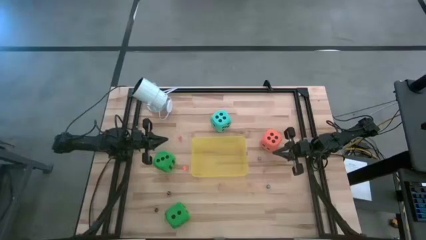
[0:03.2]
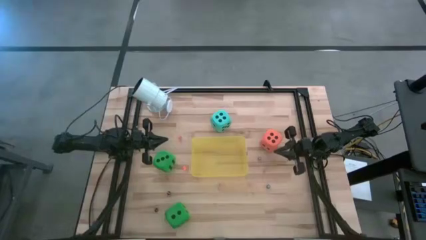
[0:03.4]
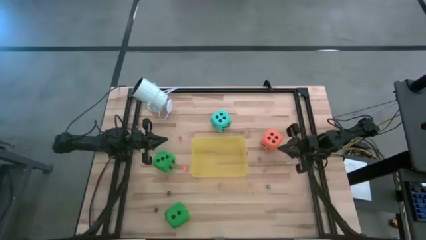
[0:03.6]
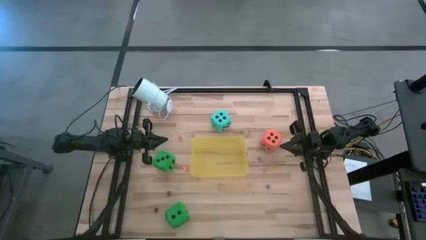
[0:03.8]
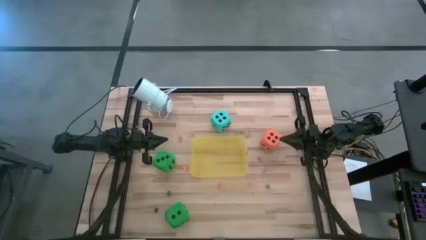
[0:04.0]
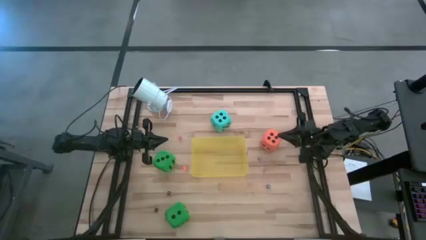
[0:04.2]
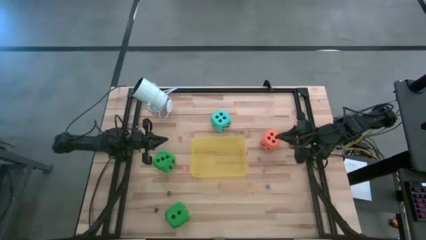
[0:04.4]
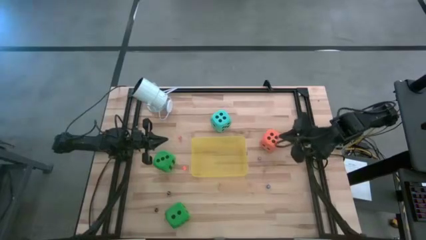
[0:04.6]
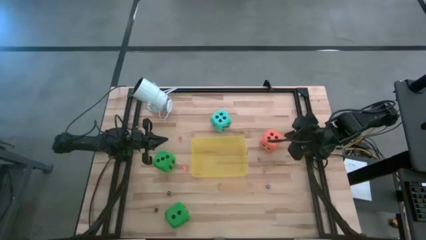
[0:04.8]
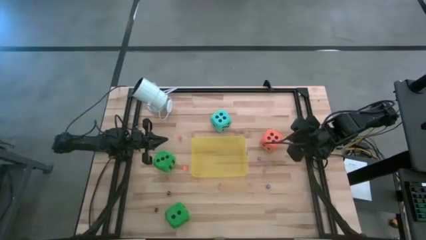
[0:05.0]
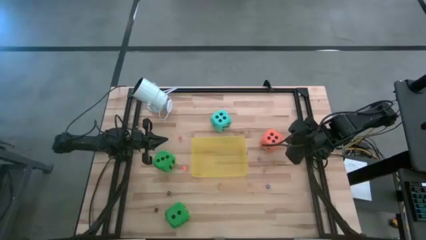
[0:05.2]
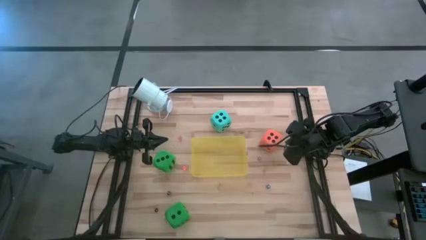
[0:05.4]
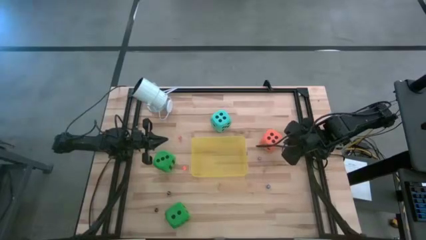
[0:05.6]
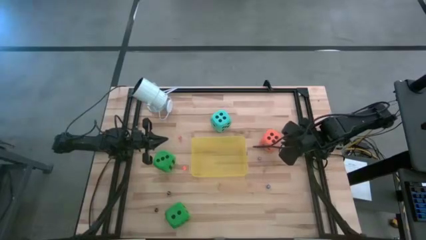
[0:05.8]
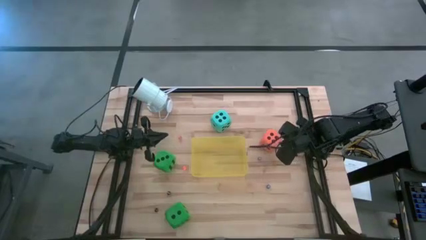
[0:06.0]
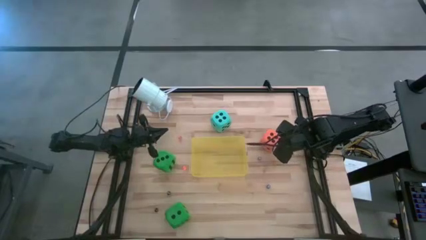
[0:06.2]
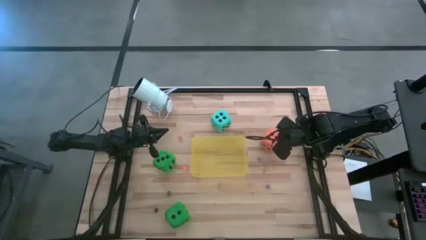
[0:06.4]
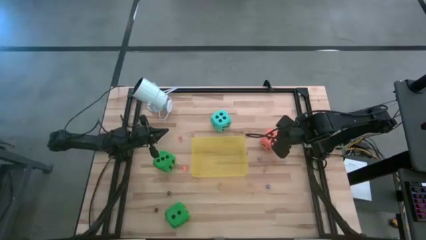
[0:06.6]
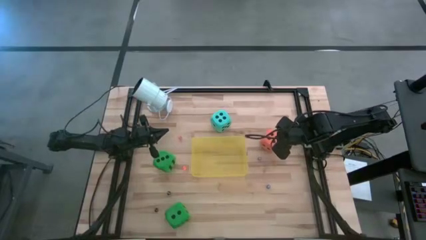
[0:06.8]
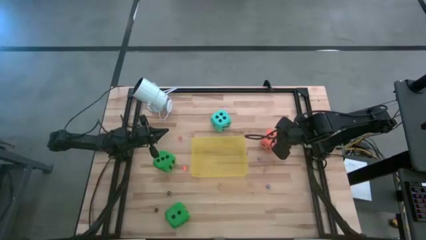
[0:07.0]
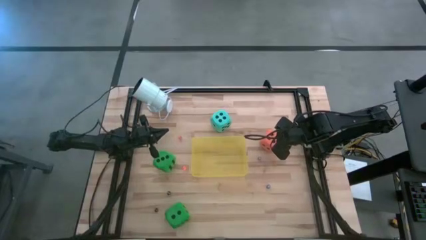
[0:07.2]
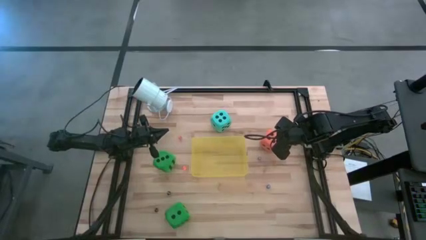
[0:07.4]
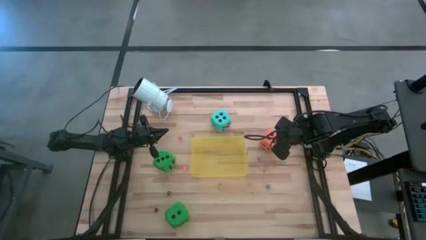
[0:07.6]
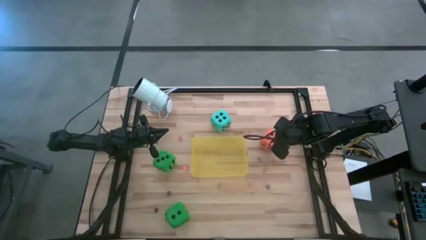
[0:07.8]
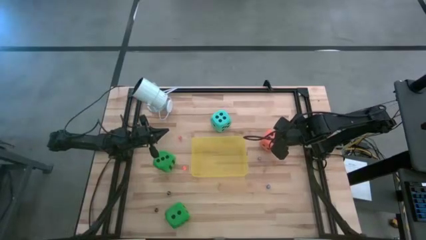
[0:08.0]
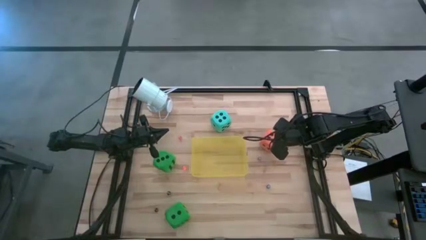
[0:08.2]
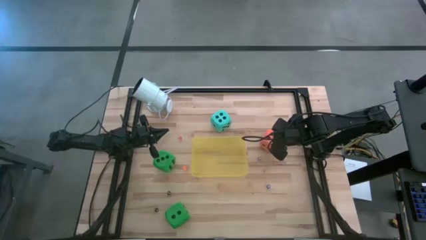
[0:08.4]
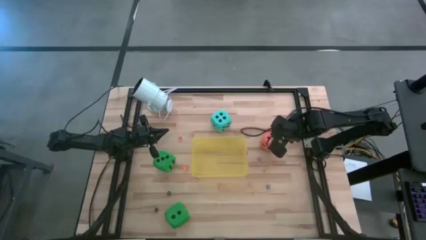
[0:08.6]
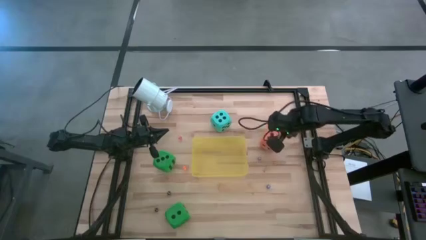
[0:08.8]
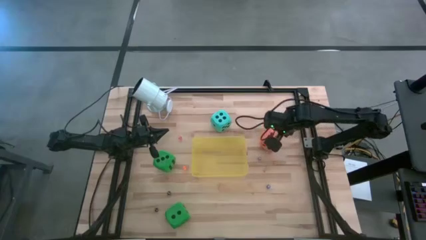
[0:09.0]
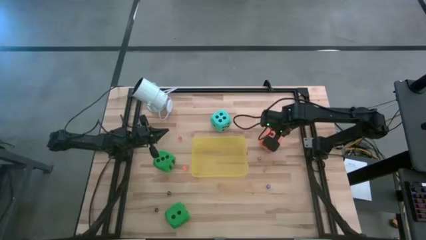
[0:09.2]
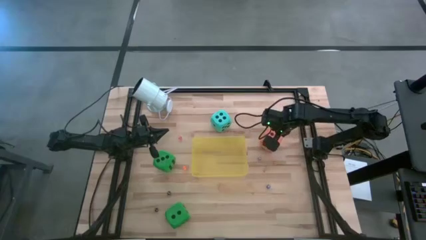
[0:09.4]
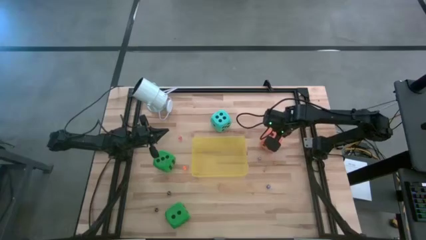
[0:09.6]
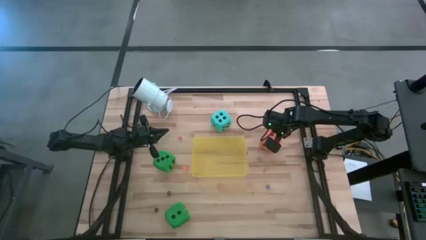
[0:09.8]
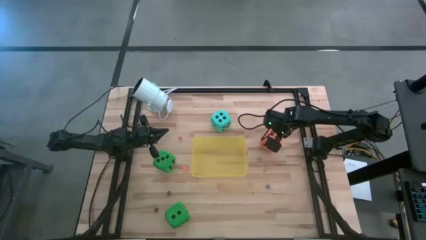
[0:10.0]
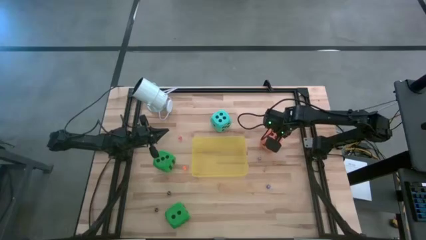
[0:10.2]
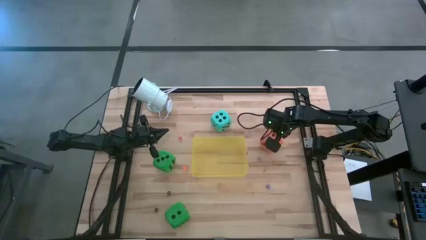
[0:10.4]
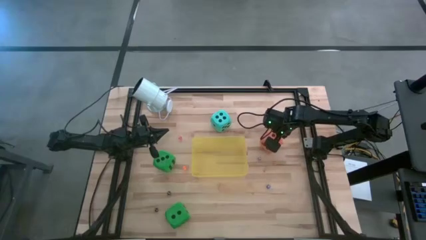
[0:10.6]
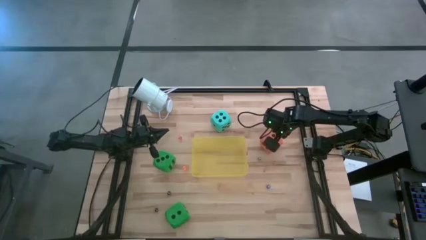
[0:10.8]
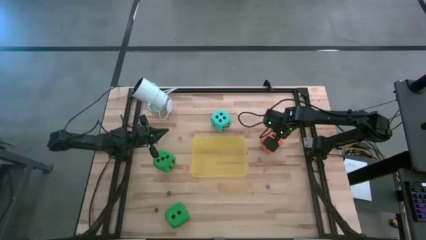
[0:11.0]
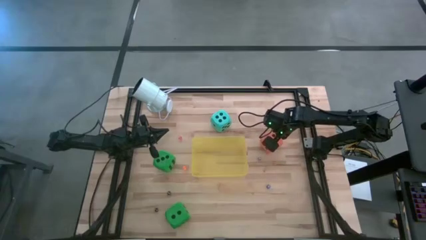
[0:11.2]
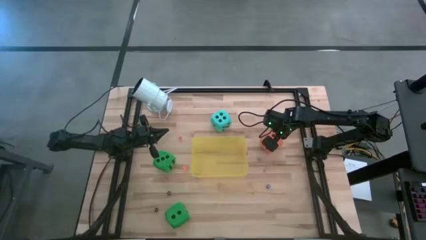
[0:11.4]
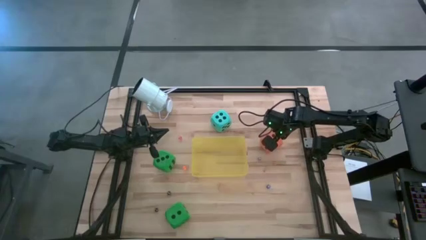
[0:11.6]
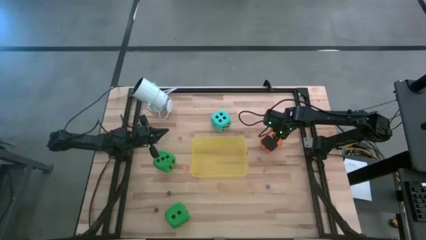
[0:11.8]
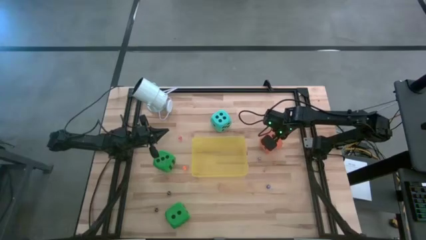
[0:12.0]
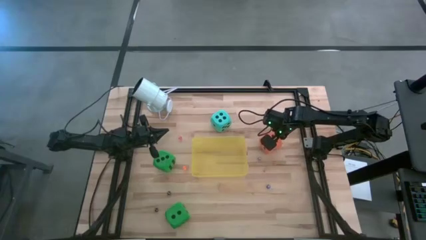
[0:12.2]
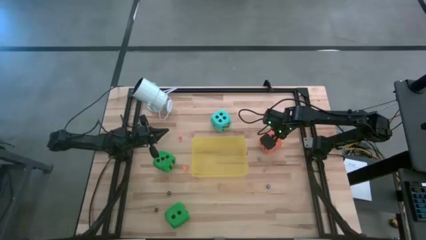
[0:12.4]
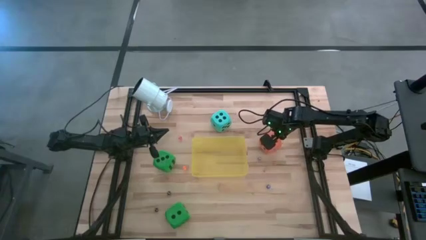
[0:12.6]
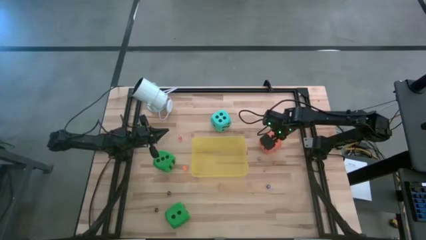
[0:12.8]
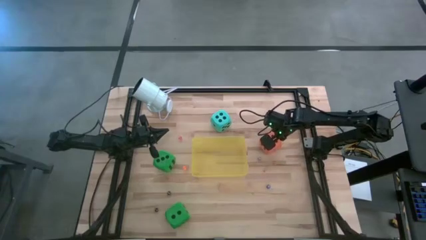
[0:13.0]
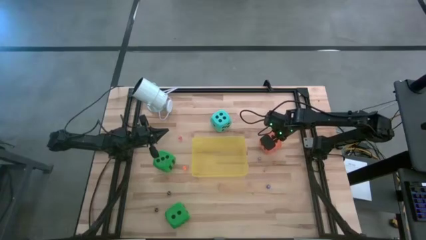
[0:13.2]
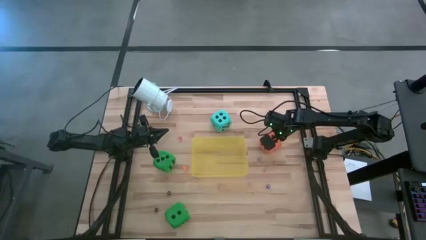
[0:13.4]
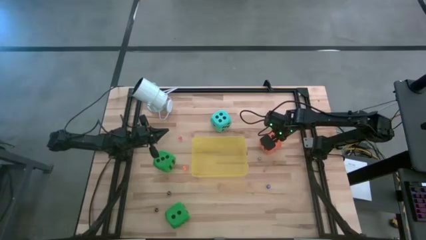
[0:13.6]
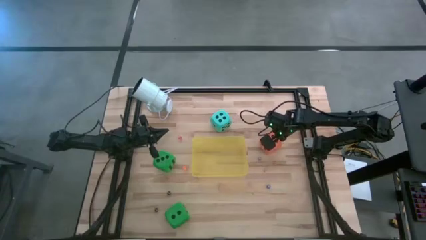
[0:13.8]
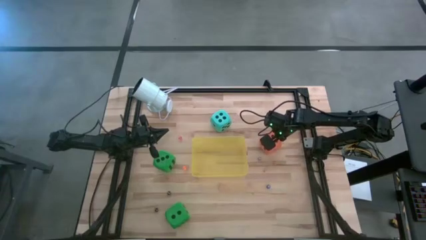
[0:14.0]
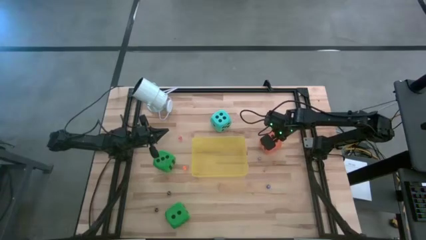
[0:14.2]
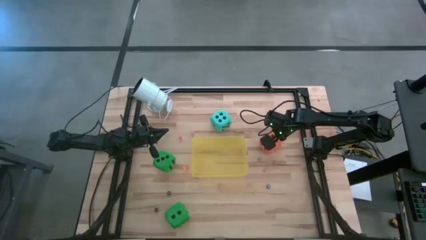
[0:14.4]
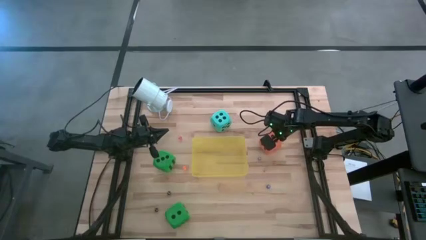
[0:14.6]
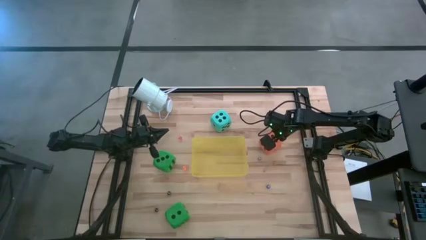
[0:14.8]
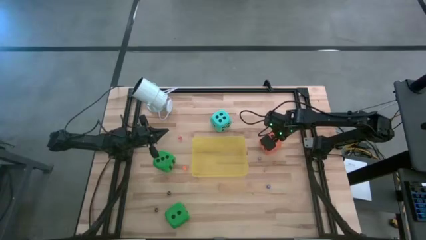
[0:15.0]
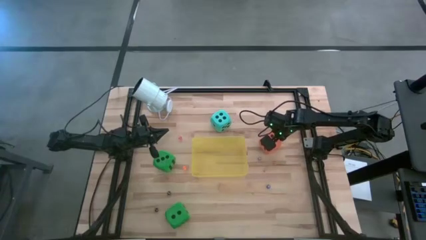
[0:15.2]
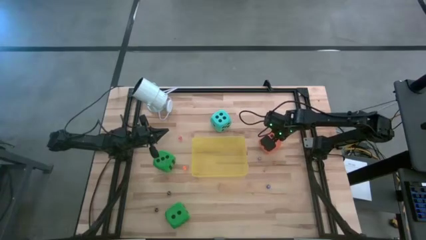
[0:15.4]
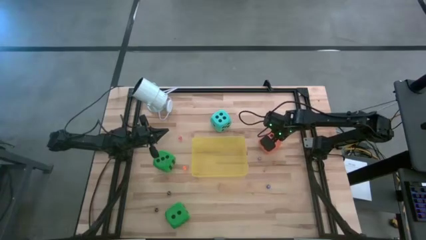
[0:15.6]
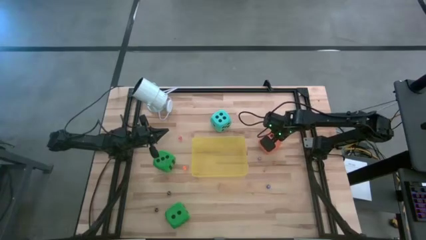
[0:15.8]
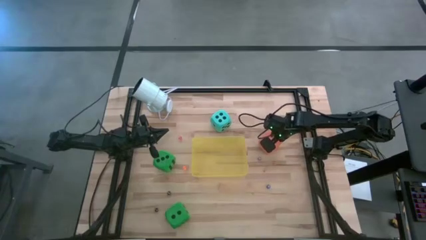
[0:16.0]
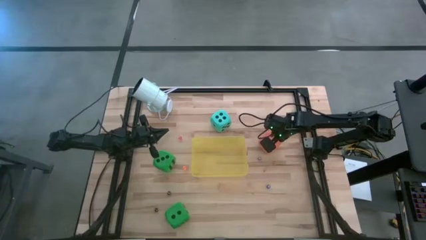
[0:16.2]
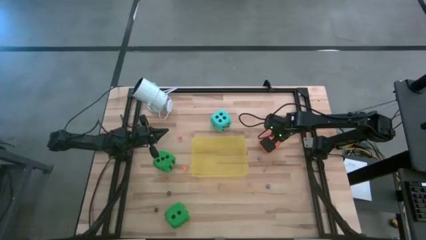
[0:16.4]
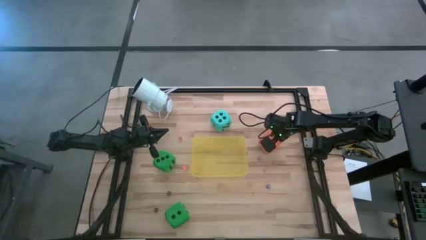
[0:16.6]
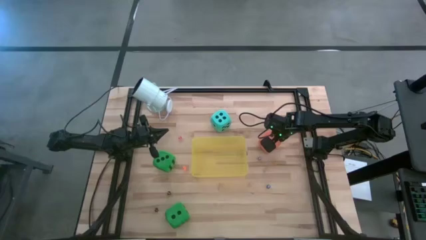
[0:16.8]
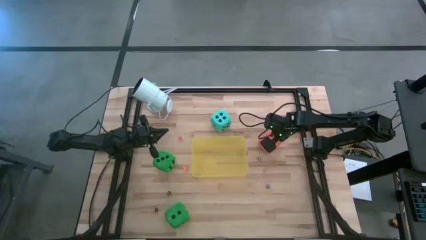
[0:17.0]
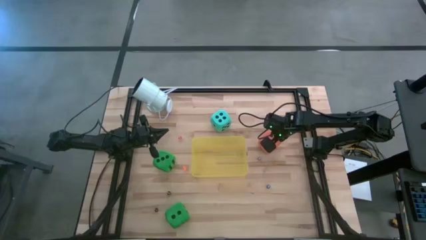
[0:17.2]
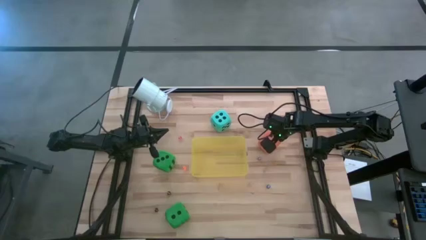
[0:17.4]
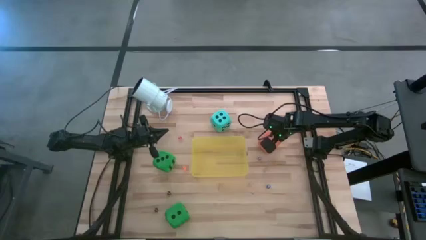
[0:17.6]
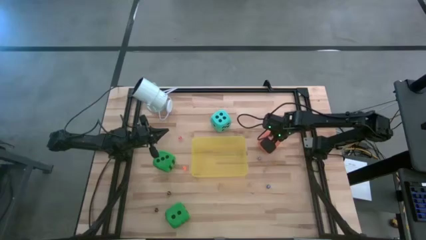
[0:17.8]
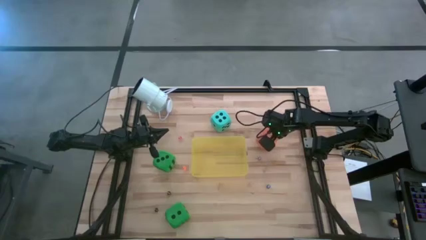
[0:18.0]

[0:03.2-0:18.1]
Task: Pick & Place Dice
Put the big orange dice into the yellow bin

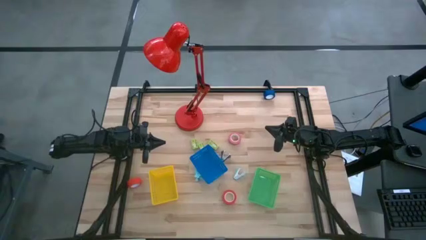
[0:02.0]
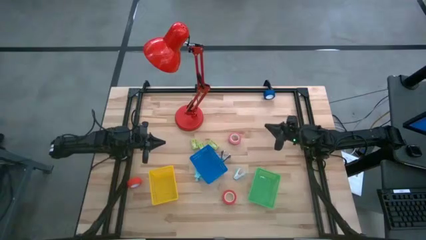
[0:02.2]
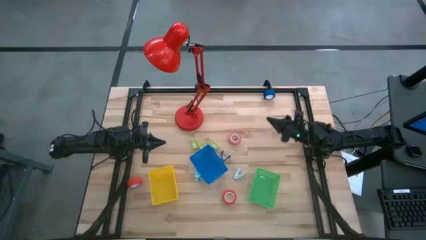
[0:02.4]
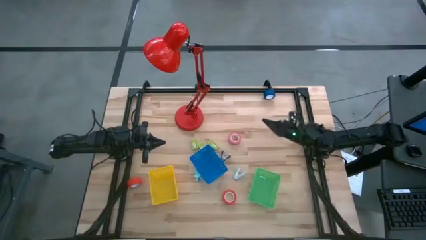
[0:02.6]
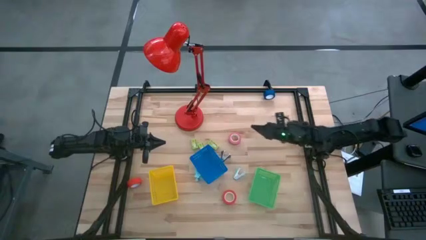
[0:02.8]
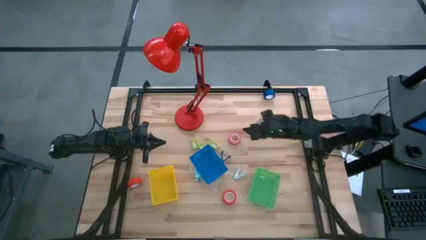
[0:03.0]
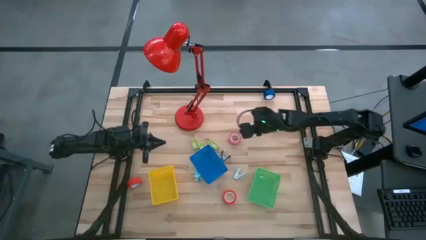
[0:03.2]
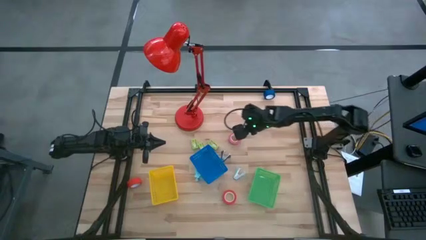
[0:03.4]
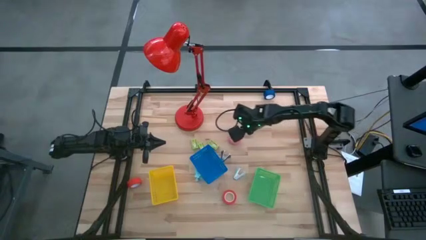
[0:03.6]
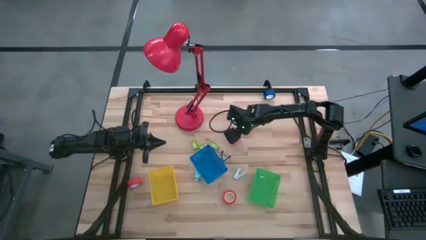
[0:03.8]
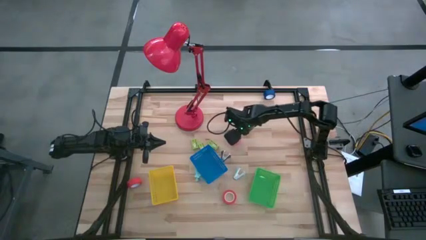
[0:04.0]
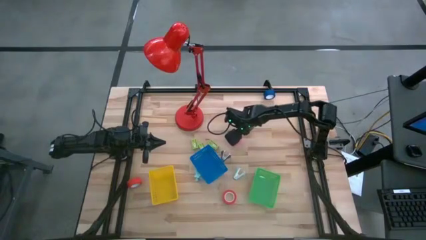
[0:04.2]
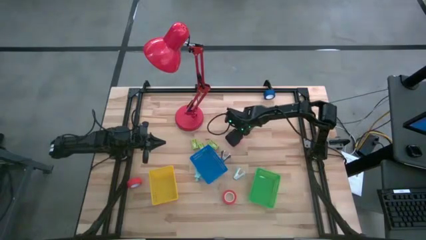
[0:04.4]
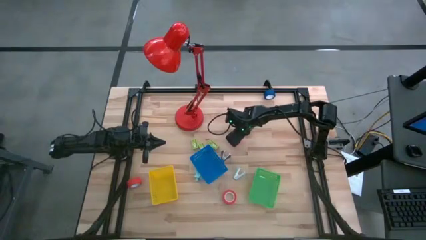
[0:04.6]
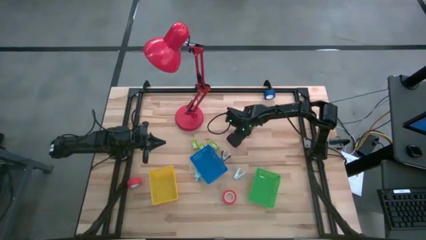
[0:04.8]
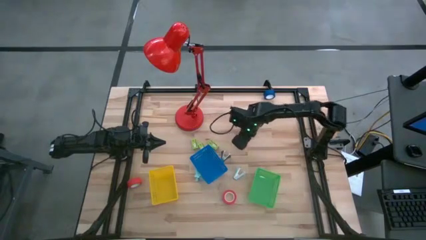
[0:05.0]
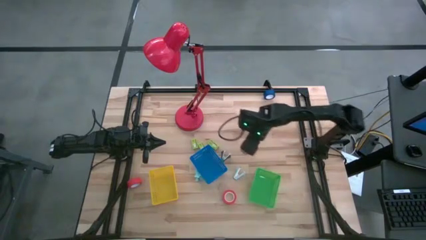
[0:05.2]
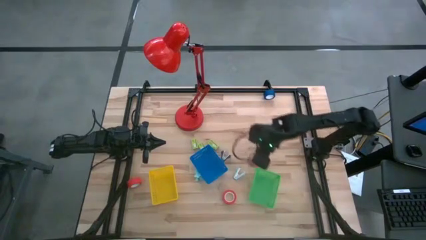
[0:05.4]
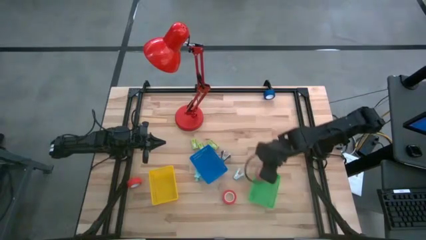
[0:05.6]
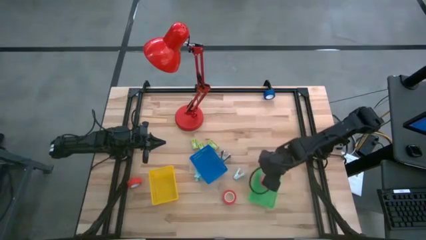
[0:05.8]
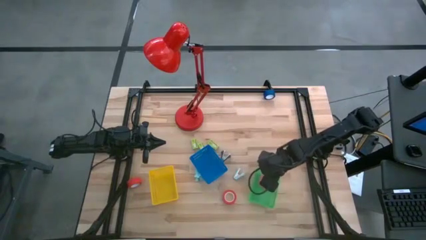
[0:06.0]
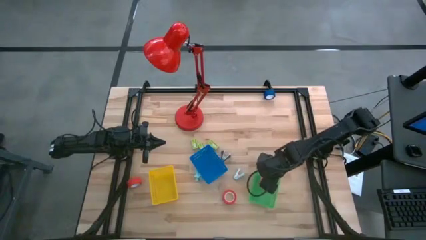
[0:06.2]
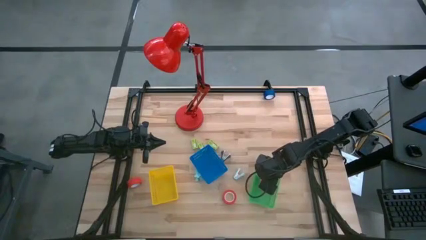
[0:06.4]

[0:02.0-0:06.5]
Task: Pick and place Stapler, Stapler remover, tape
Put the pink tape into the green bin
